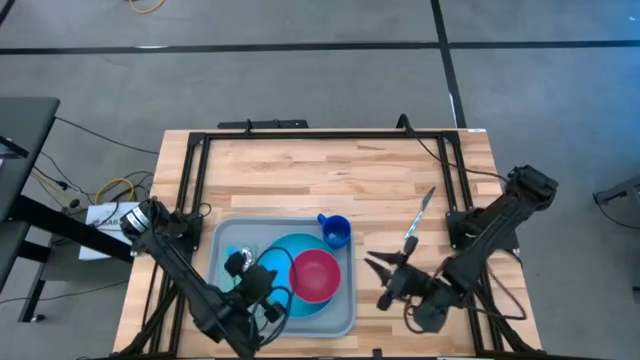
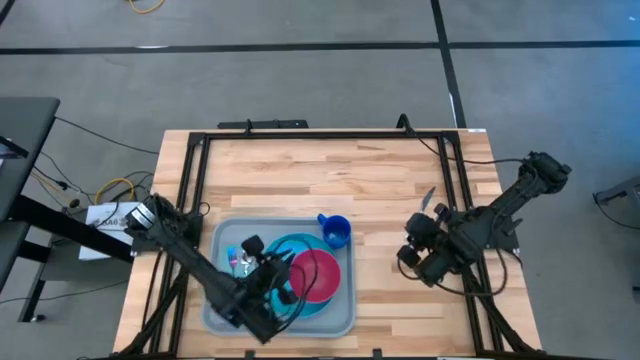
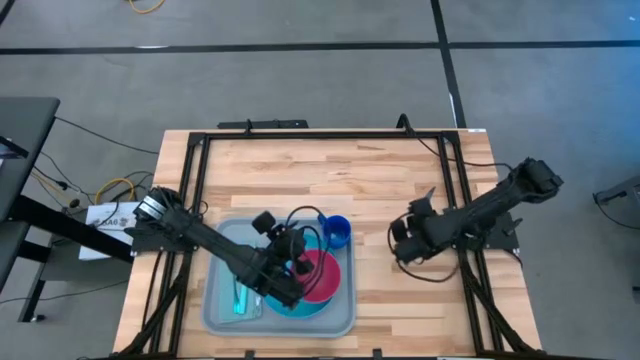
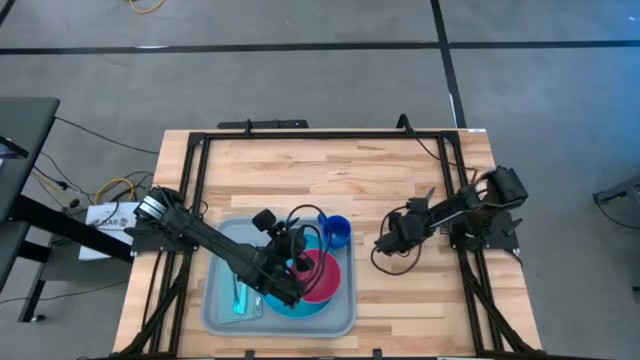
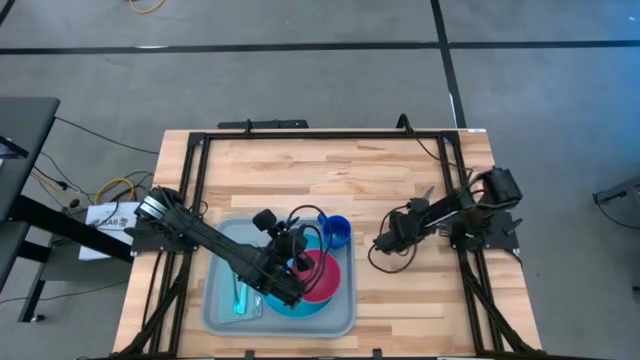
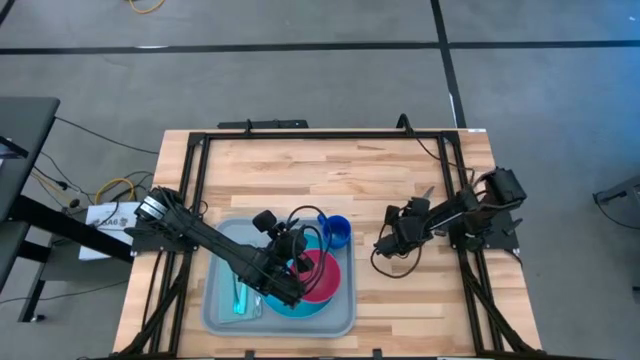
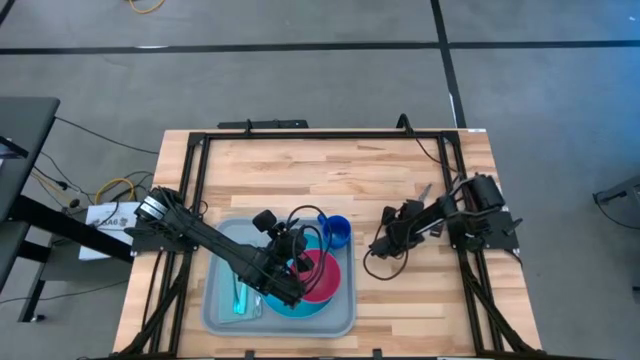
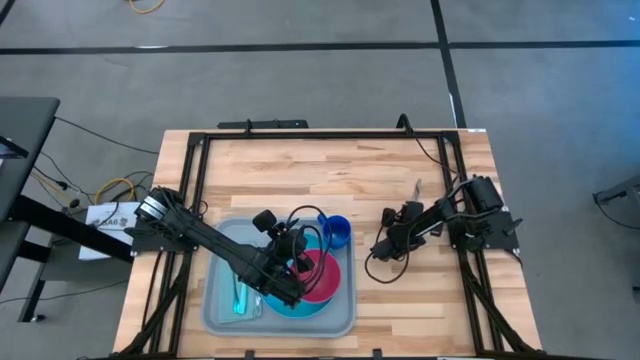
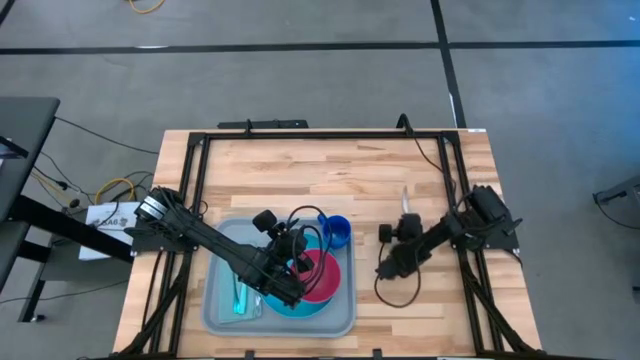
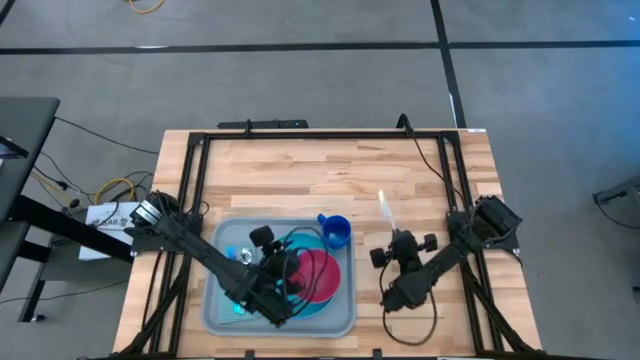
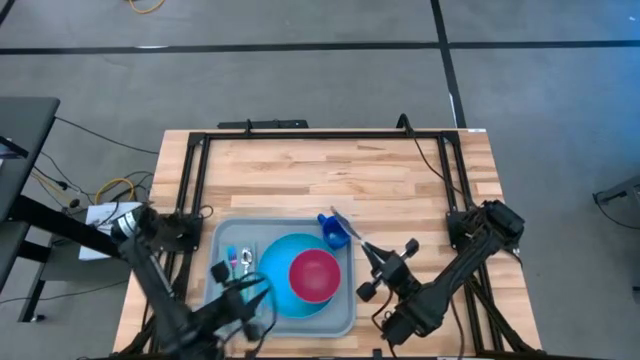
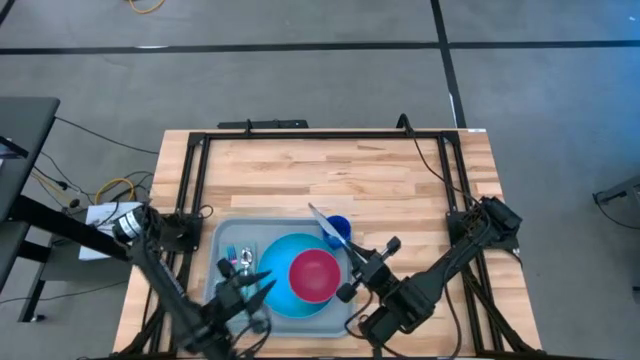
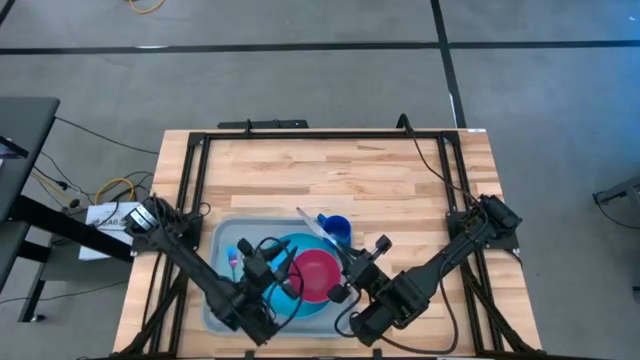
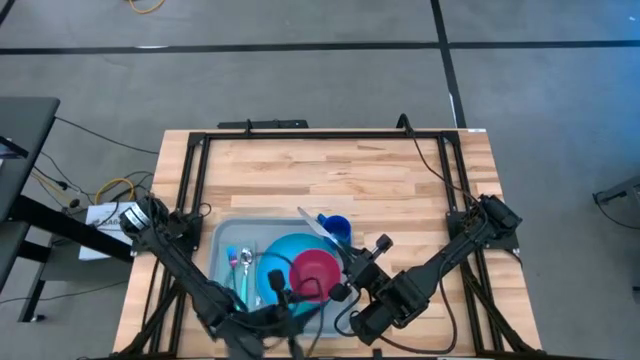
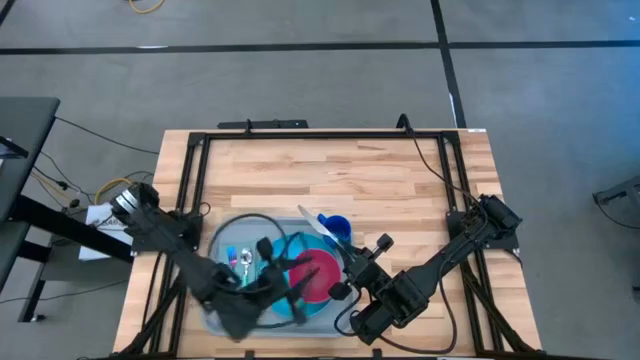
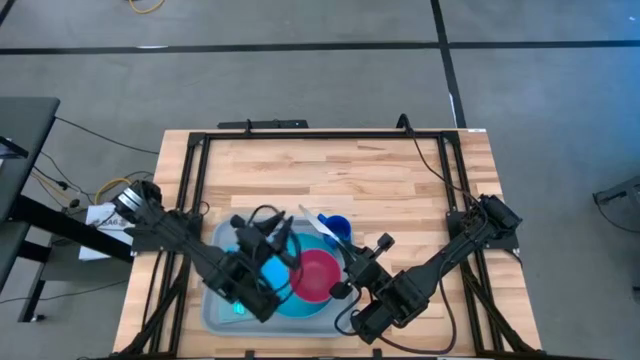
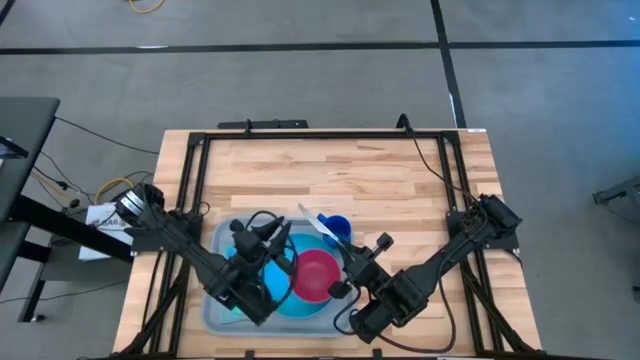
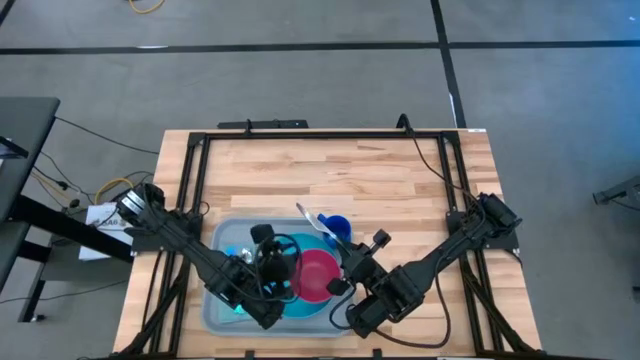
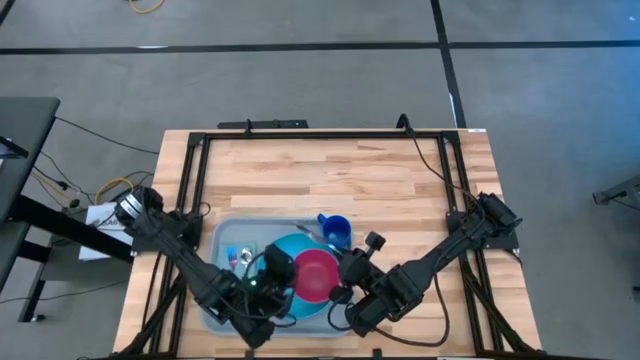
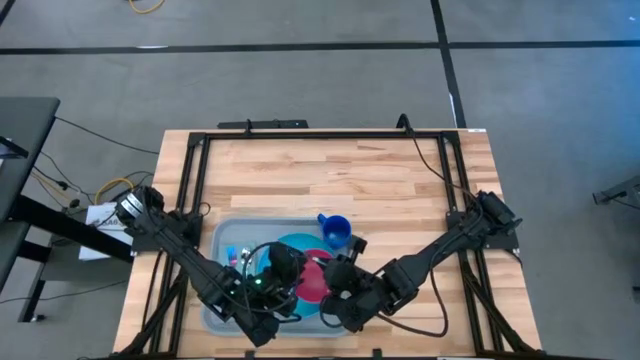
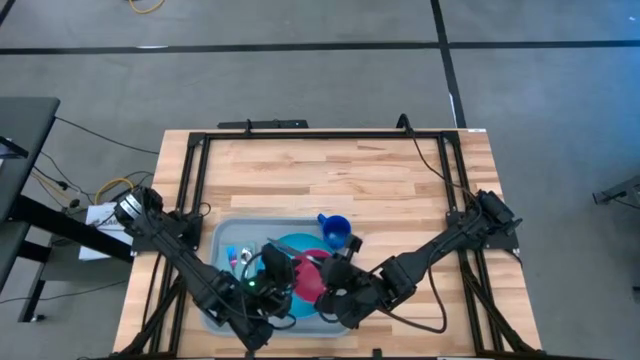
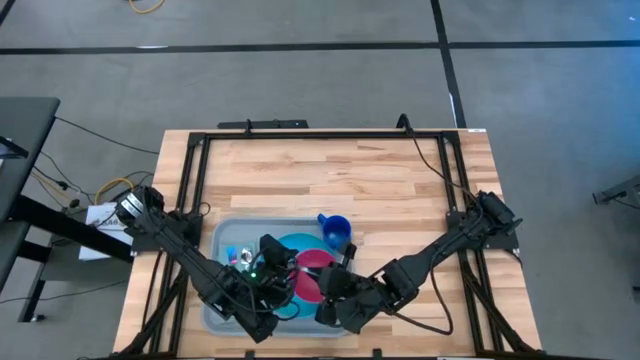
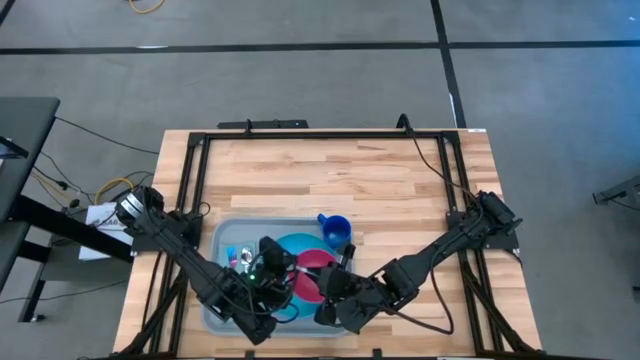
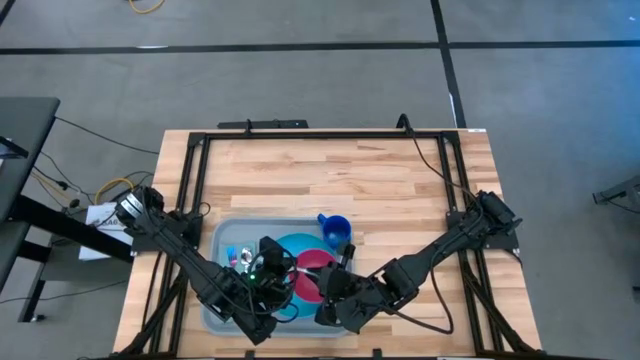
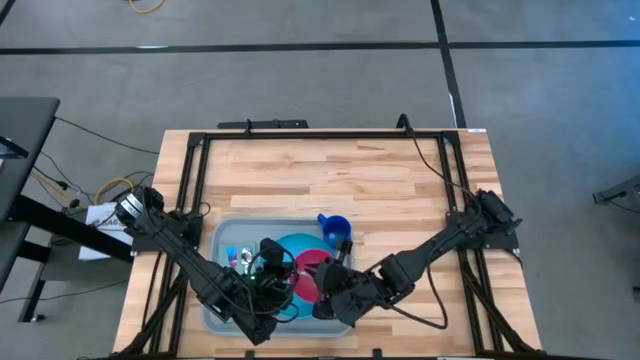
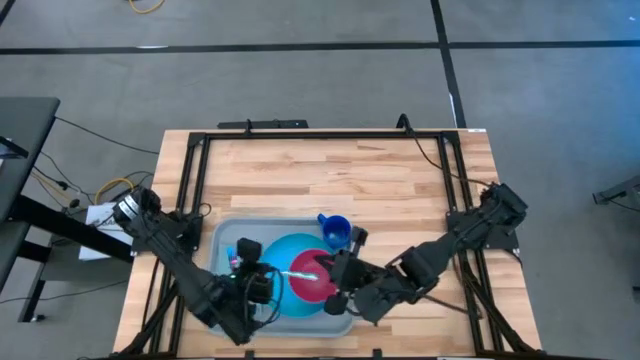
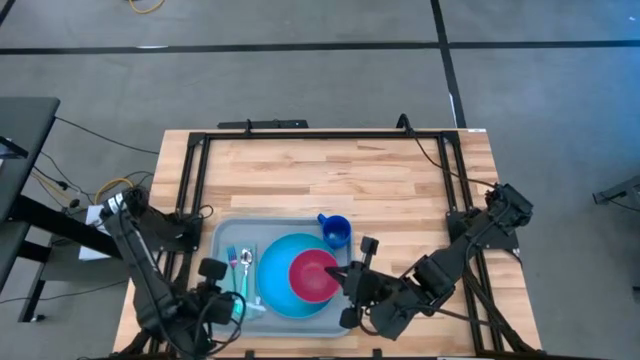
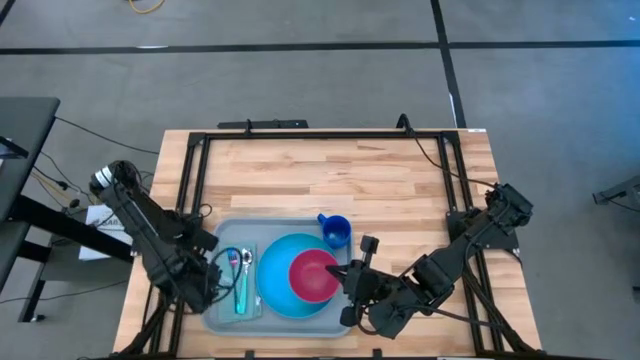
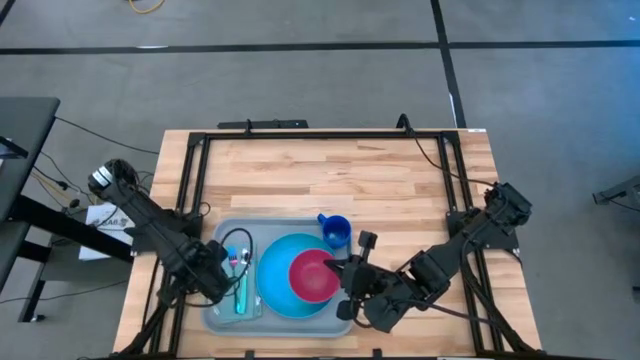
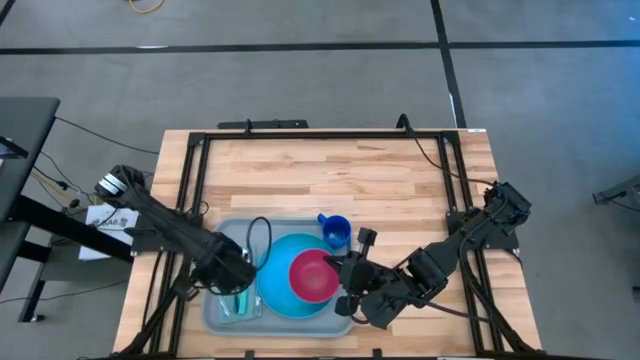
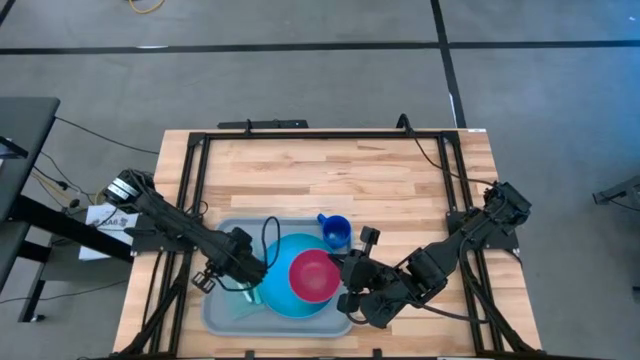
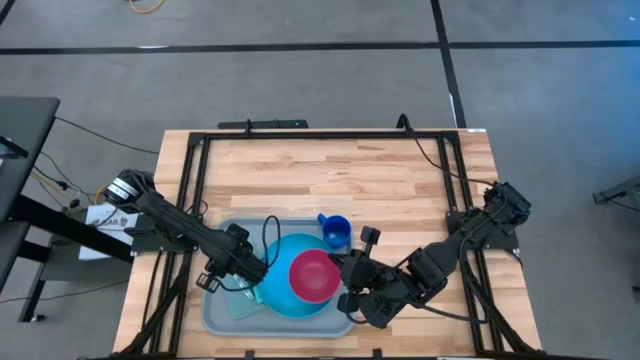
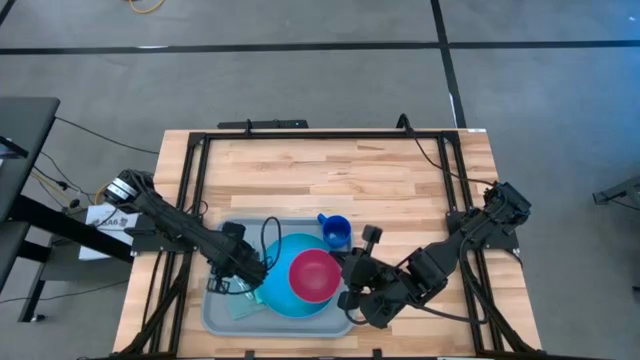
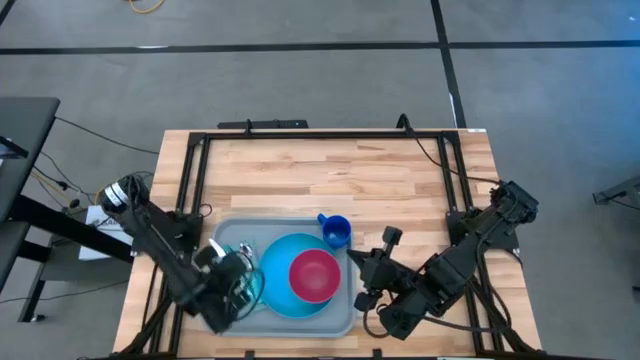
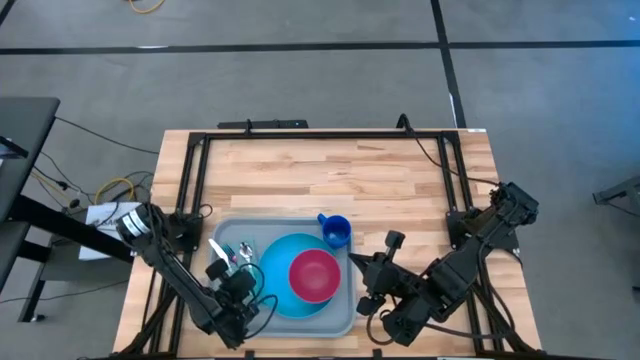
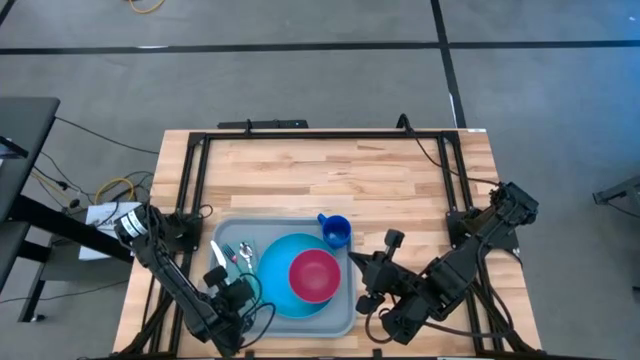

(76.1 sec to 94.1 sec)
Task: Set up tray
Put the white patterned knife beside the blue fork on the blue napkin on the gray serving tray
